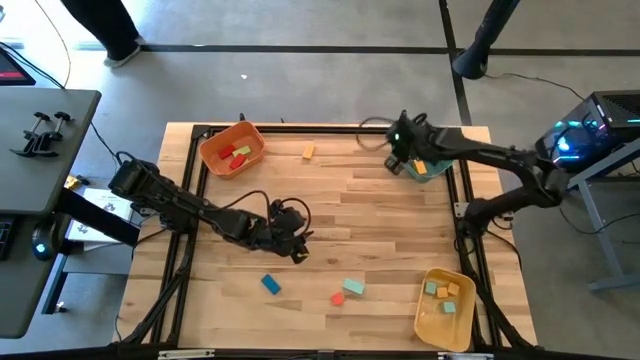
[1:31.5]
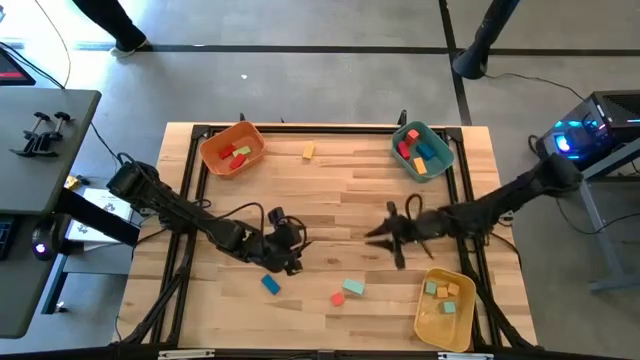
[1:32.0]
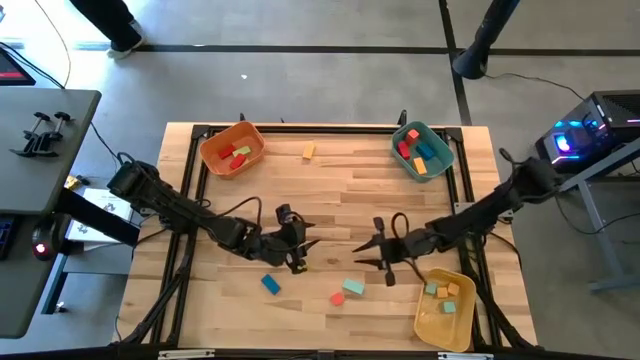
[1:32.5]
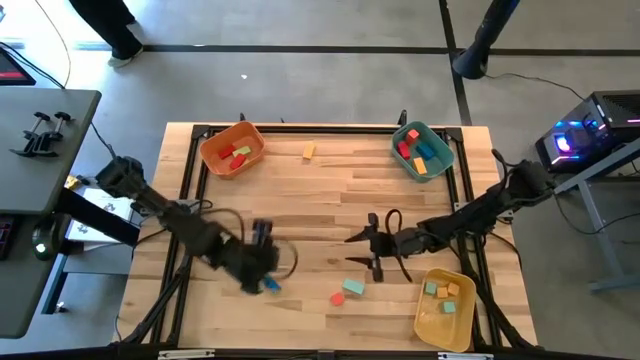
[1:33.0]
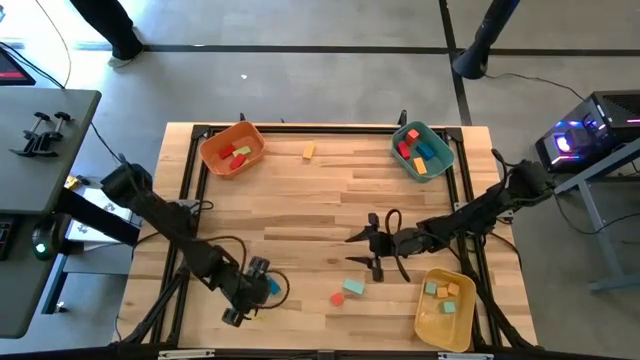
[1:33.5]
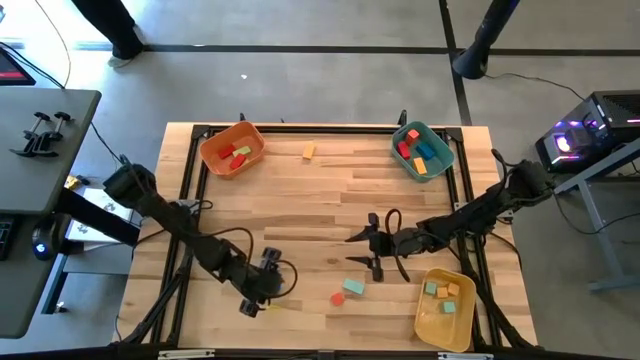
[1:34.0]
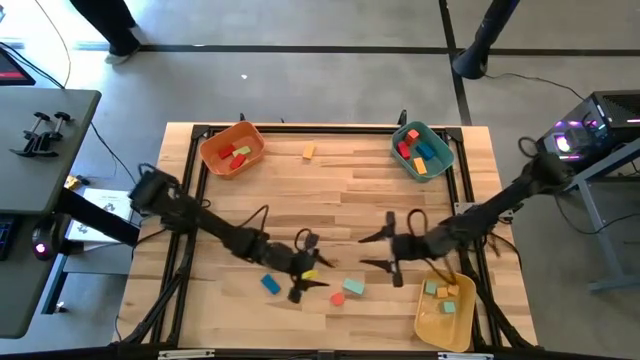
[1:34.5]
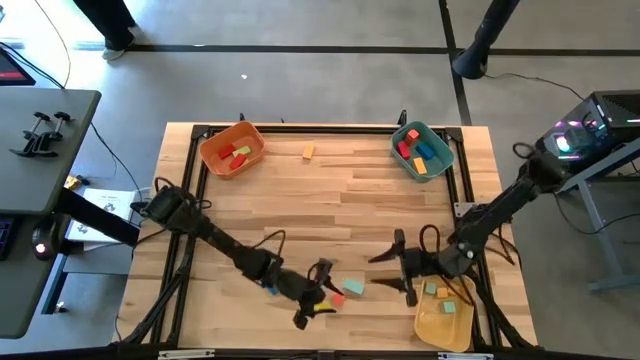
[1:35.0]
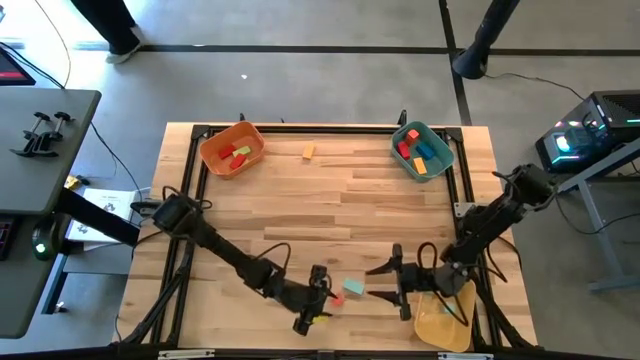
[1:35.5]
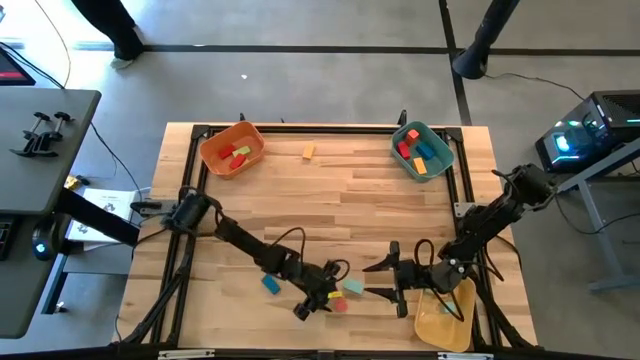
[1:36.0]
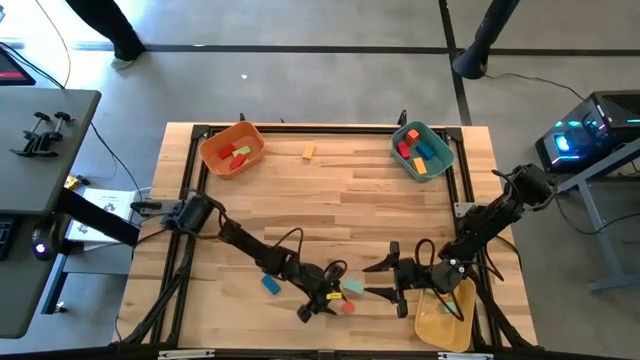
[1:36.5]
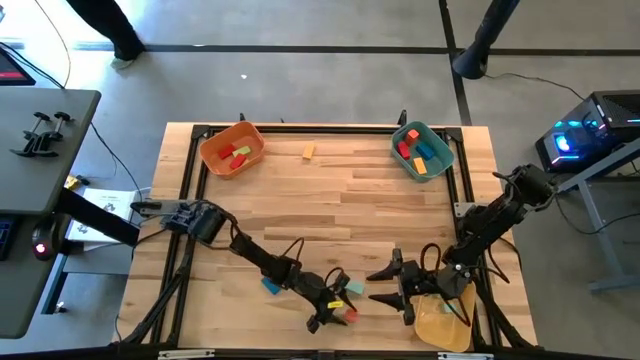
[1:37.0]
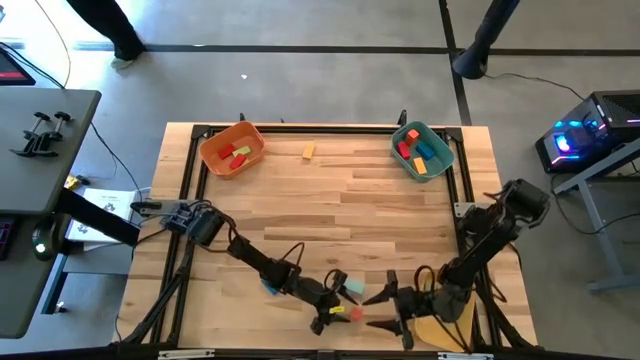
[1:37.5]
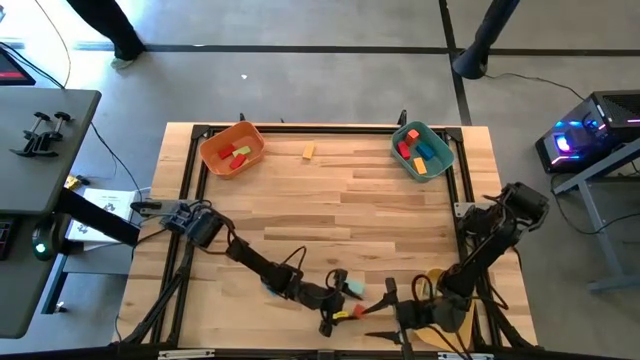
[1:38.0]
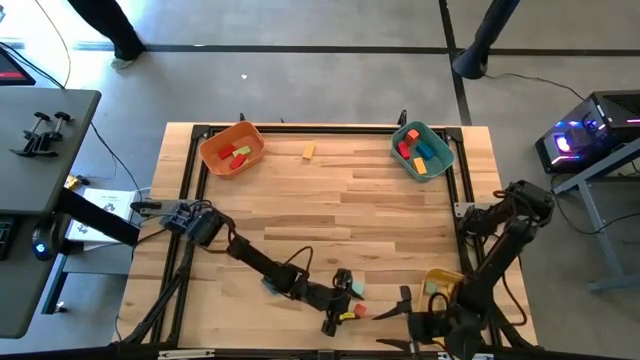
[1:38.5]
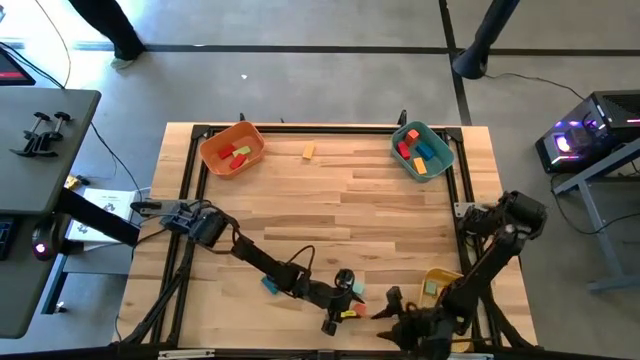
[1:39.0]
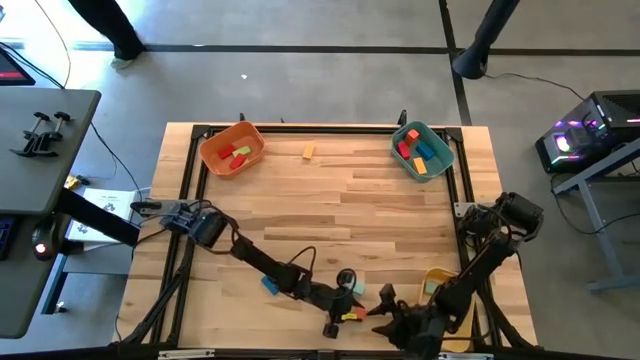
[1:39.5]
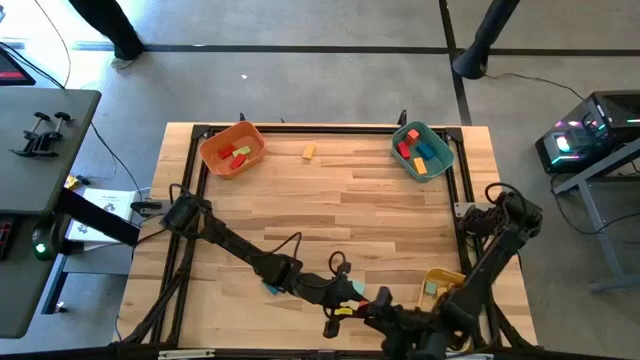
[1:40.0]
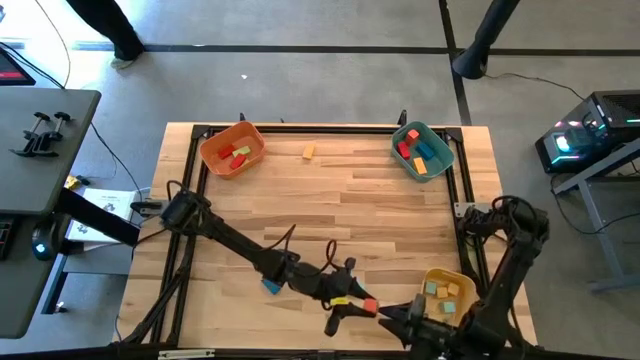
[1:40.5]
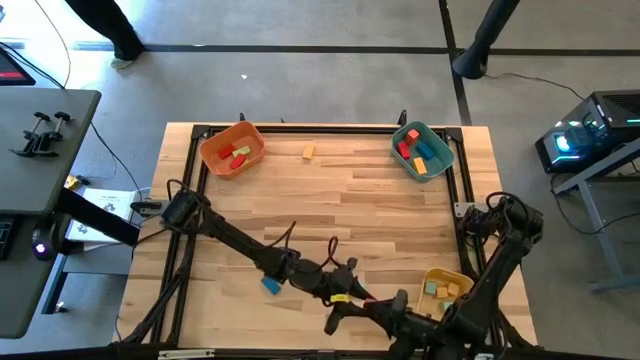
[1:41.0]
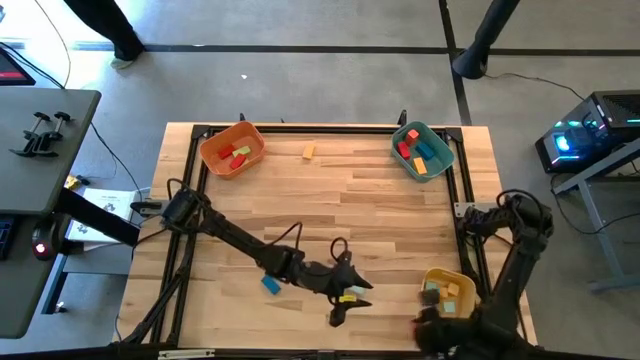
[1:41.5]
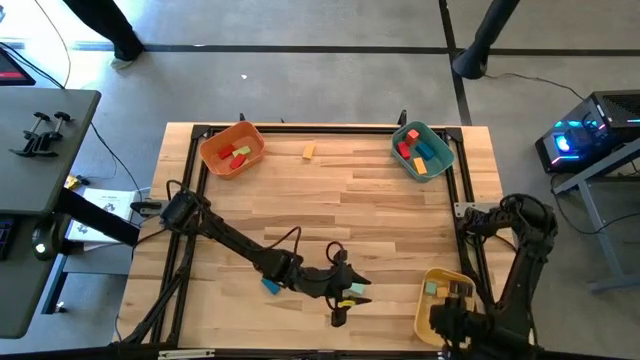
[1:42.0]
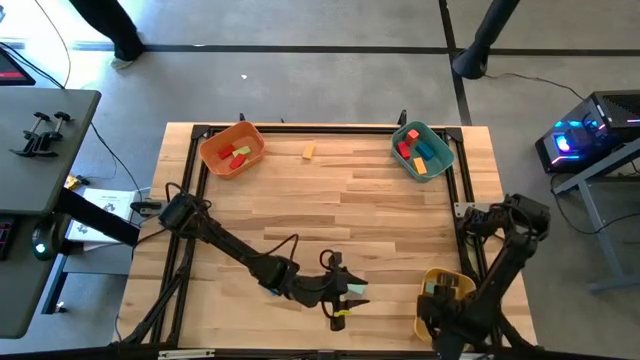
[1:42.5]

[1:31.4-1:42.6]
Task: Sort blocks by size
Put the orange cube block into the yellow bin

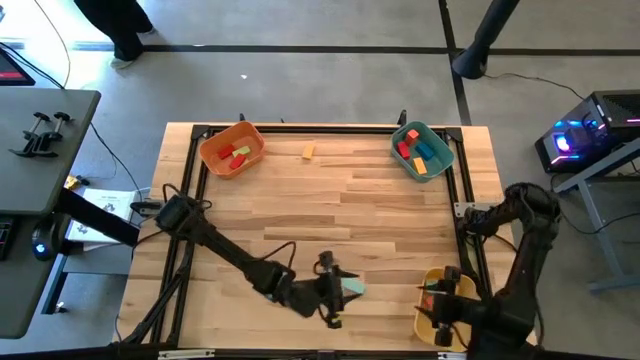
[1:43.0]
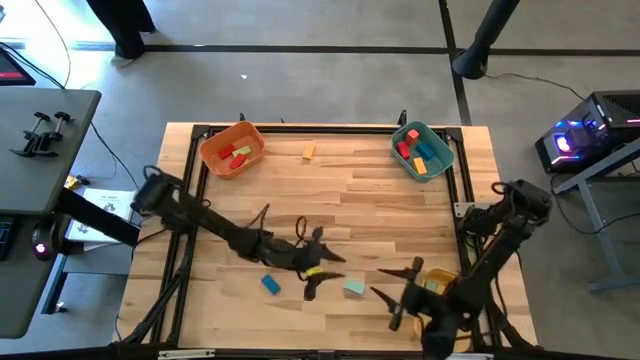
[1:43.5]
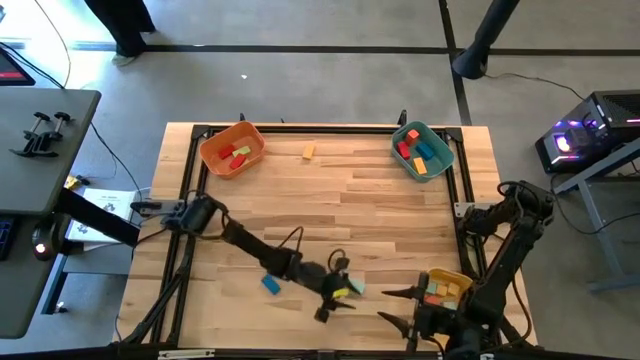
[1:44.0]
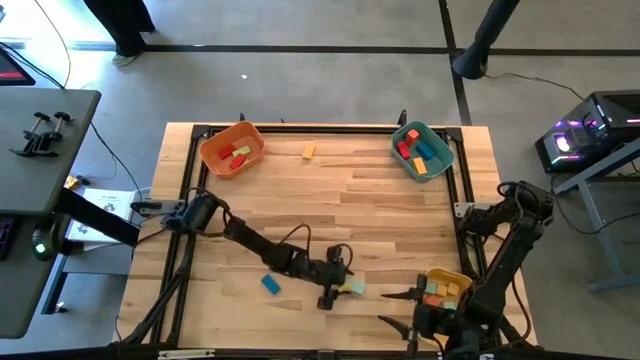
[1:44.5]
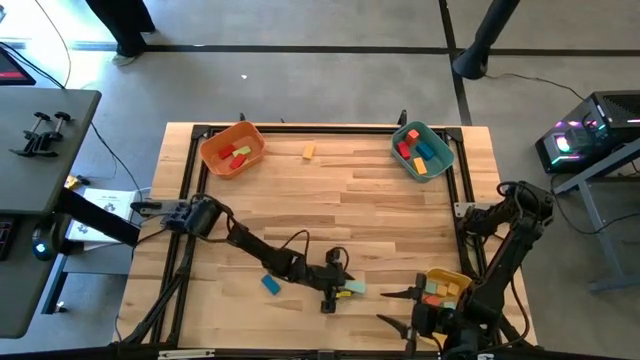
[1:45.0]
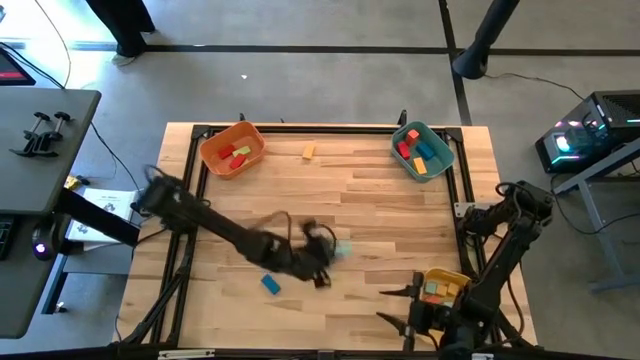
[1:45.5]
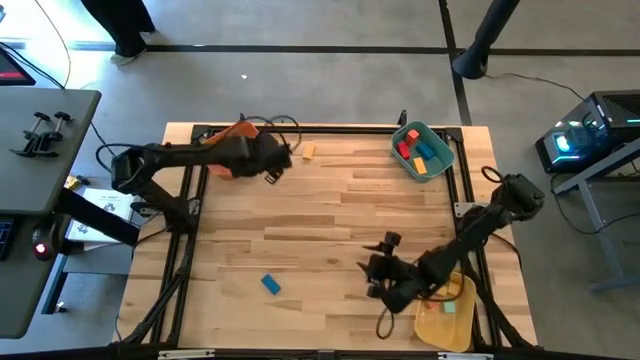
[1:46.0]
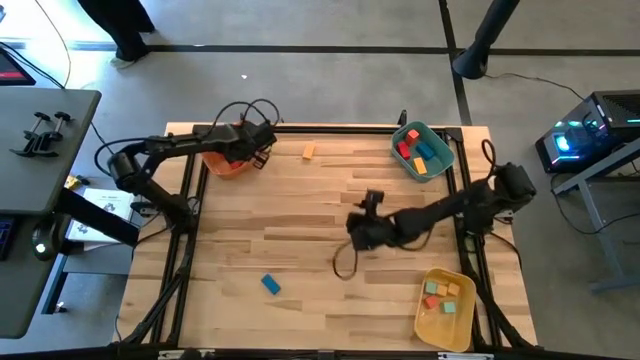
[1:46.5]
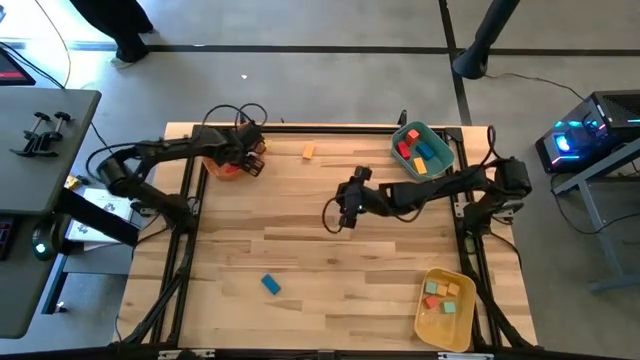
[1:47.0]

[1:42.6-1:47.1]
Put the thin light blue rectangular block into the orange bin

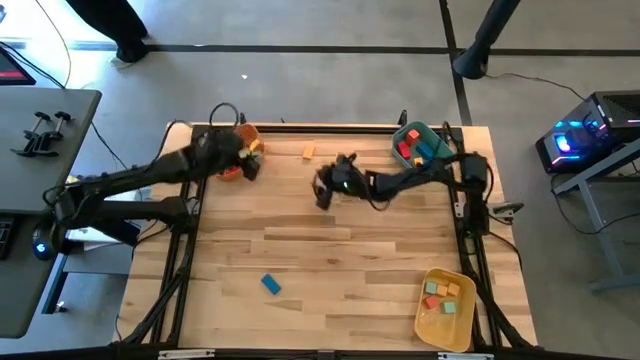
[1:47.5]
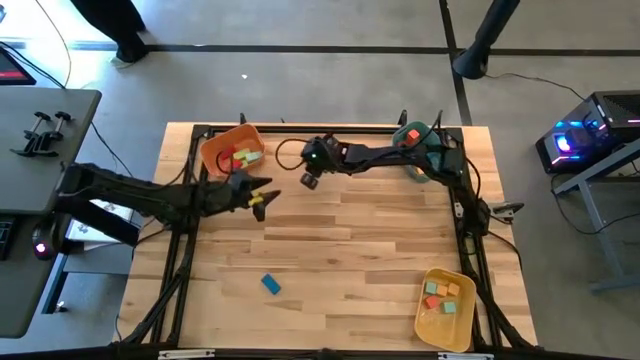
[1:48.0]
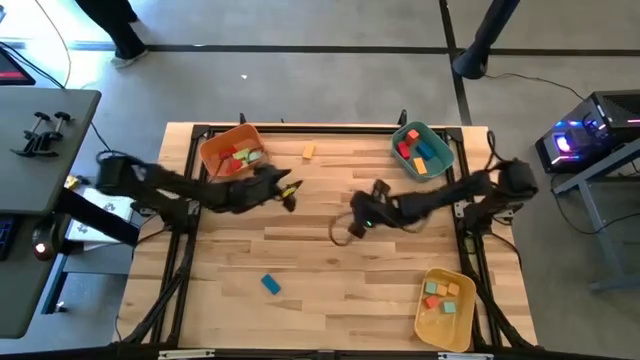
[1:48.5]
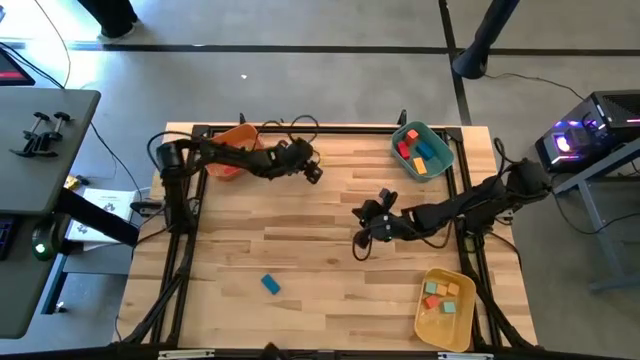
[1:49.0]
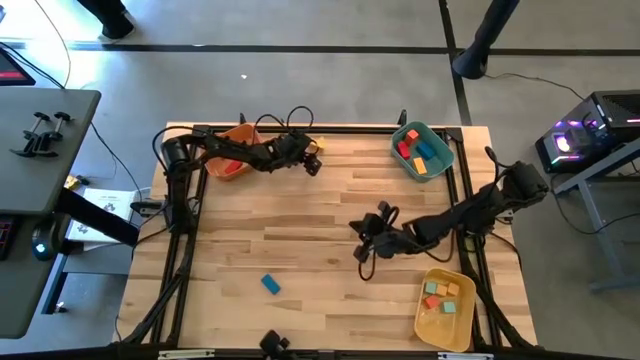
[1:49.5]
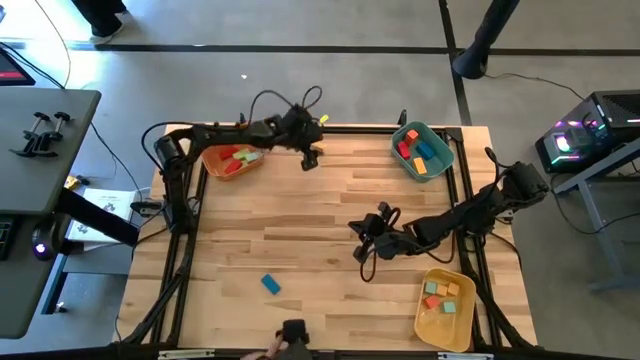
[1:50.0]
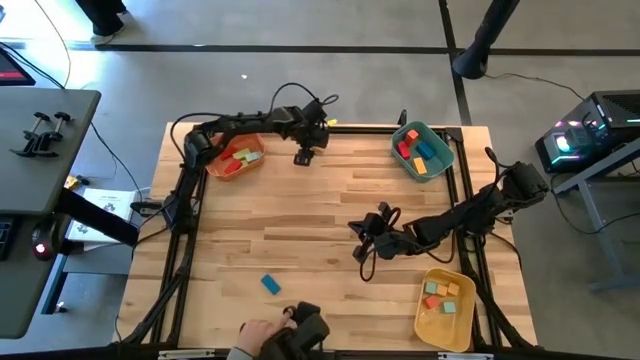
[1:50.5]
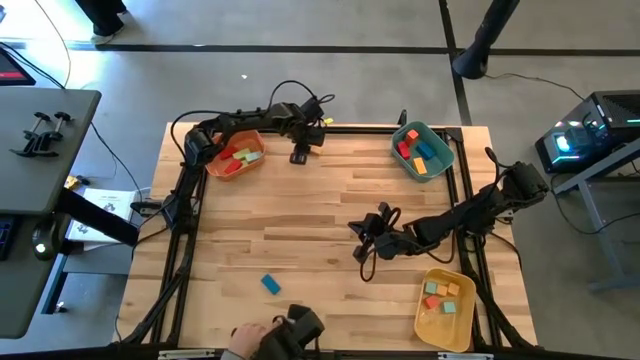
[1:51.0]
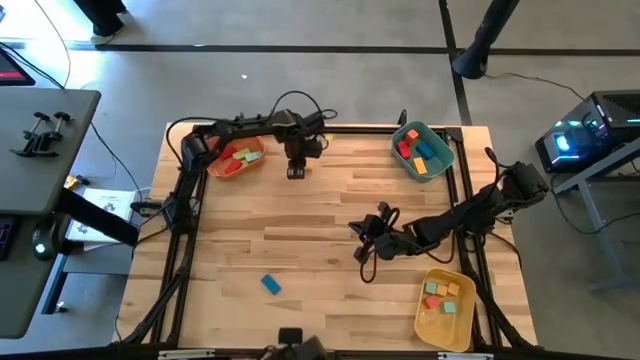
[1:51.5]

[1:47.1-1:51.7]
Put the thin yellow rectangular block into the orange bin

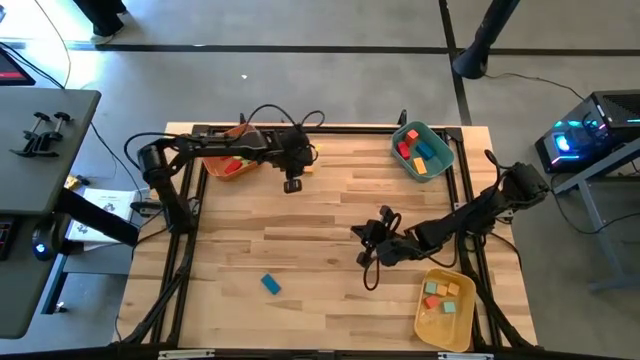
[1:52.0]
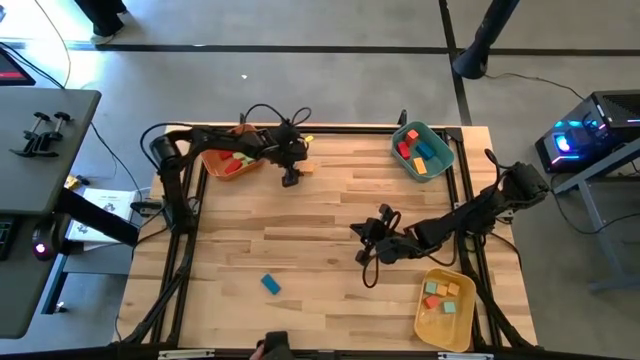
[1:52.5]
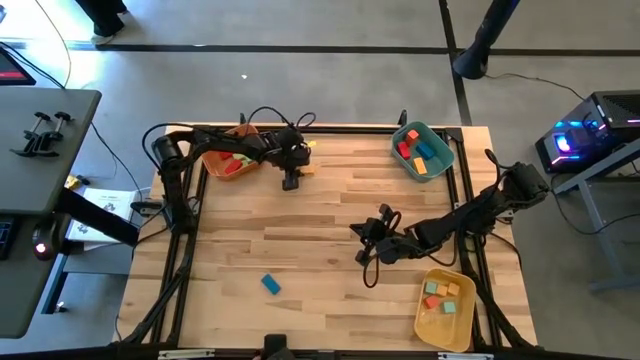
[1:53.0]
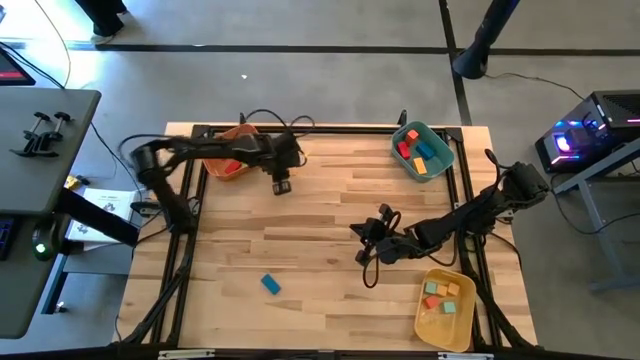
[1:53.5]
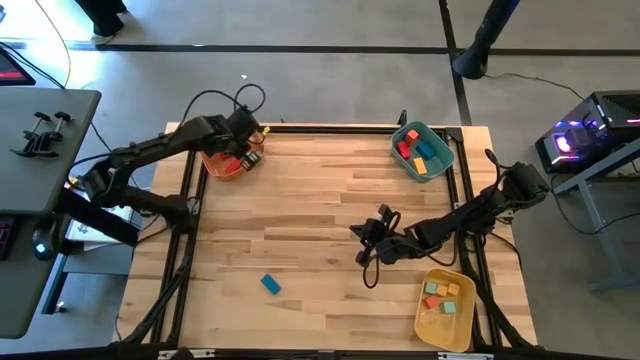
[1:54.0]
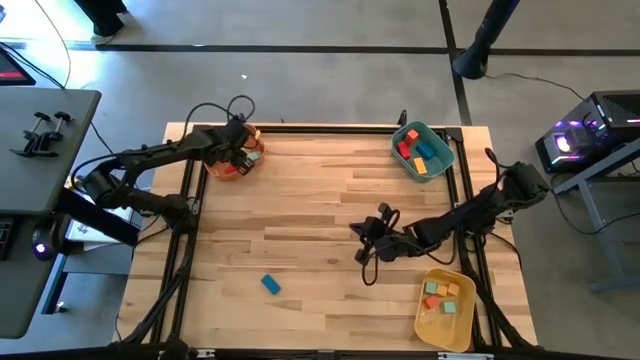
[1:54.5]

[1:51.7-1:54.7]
Put the thin yellow rectangular block into the orange bin
